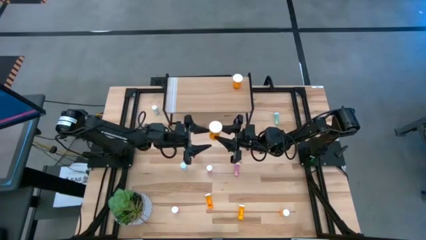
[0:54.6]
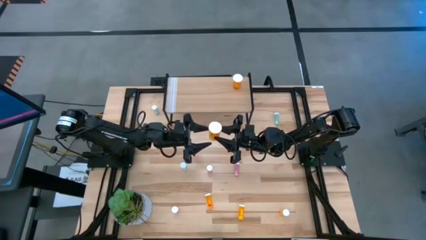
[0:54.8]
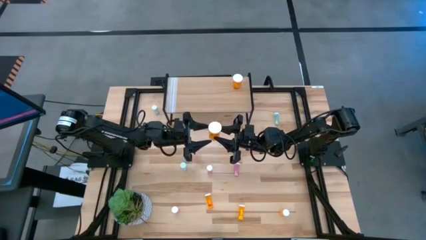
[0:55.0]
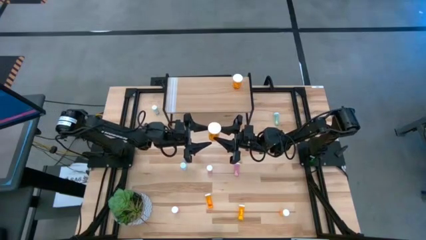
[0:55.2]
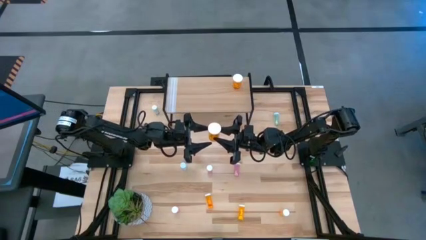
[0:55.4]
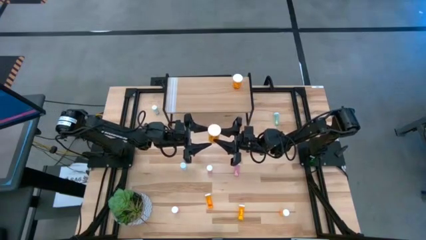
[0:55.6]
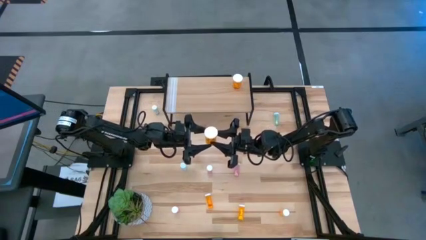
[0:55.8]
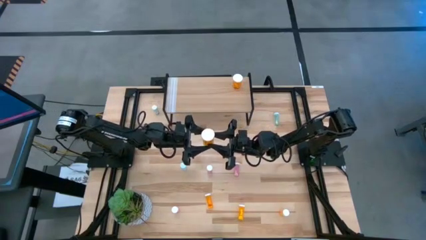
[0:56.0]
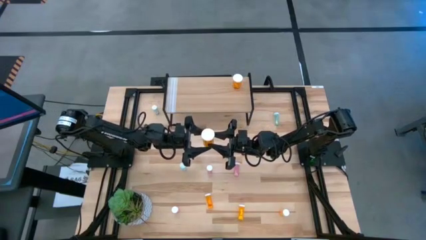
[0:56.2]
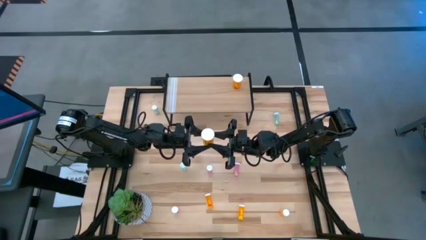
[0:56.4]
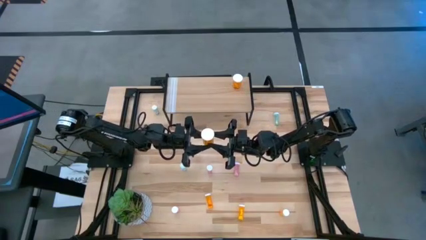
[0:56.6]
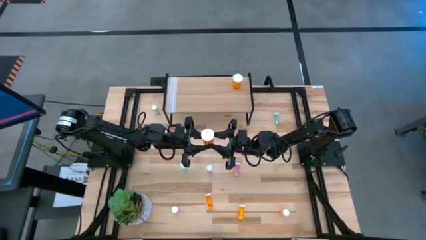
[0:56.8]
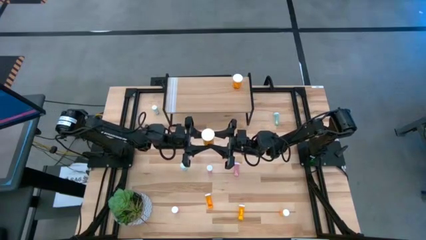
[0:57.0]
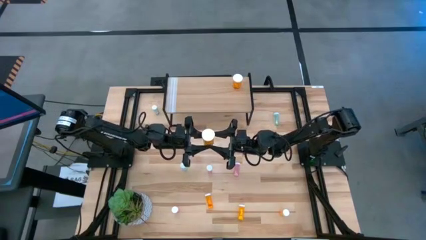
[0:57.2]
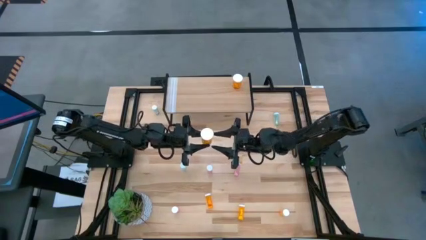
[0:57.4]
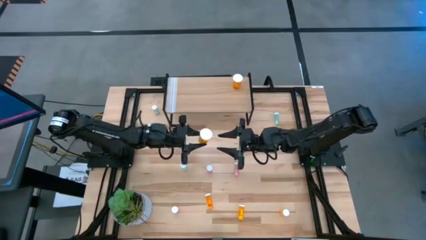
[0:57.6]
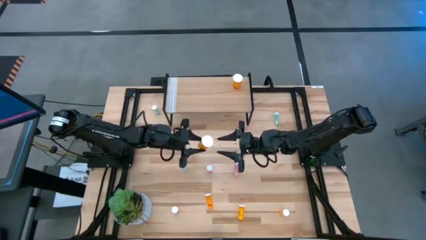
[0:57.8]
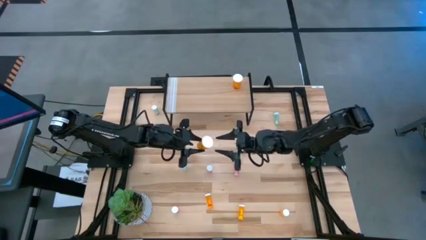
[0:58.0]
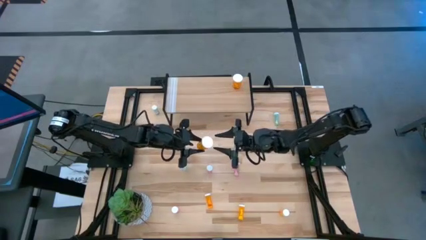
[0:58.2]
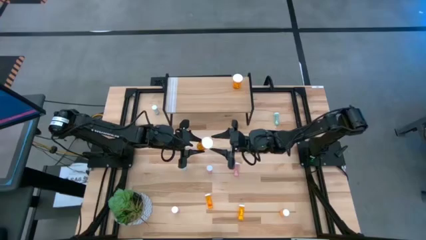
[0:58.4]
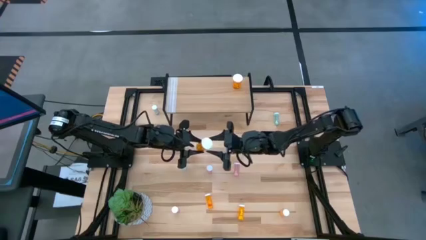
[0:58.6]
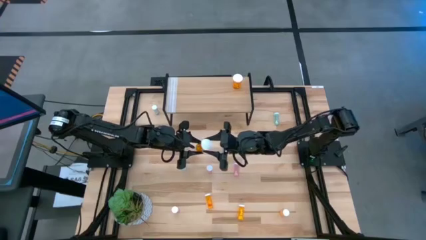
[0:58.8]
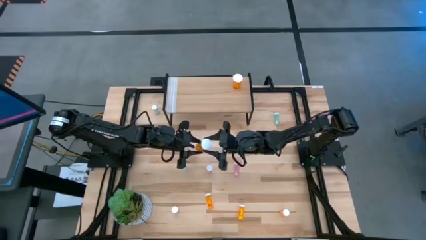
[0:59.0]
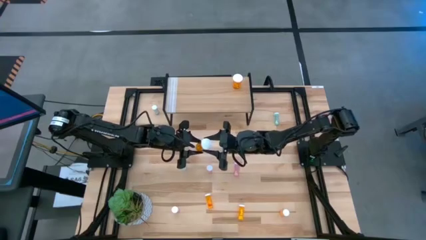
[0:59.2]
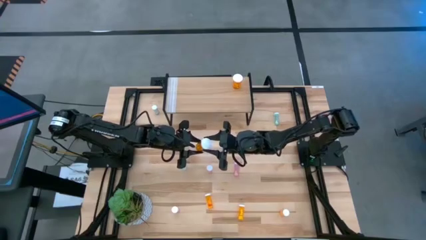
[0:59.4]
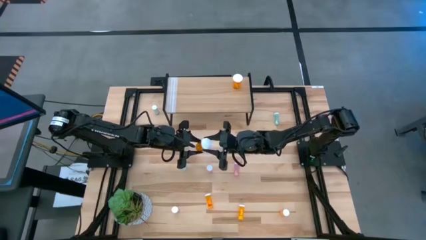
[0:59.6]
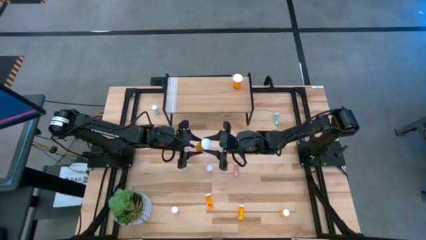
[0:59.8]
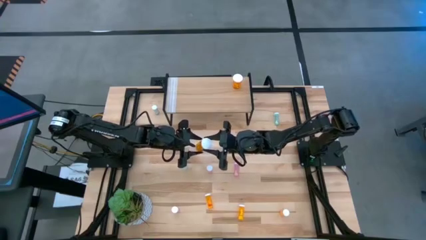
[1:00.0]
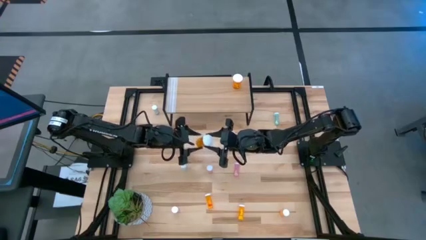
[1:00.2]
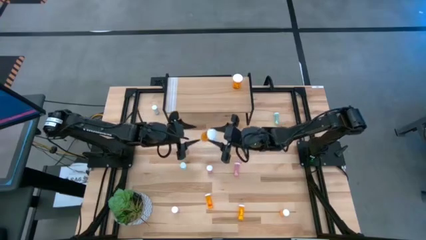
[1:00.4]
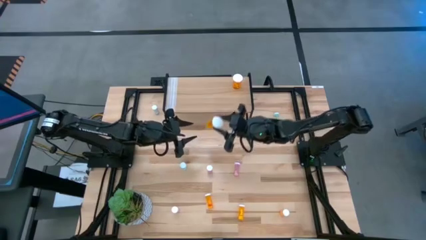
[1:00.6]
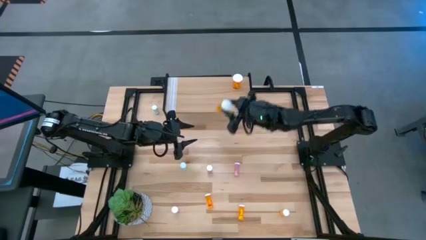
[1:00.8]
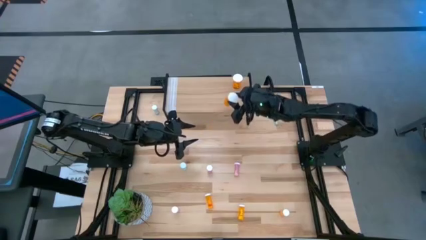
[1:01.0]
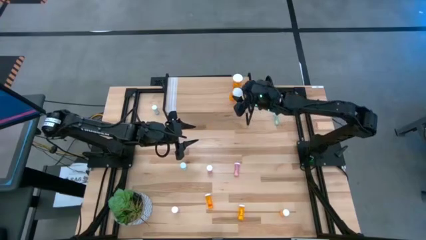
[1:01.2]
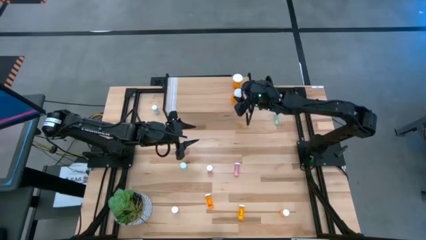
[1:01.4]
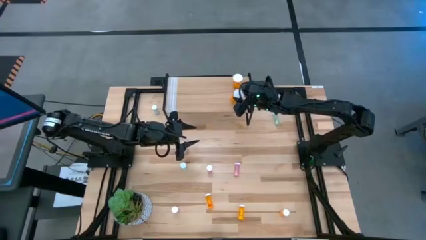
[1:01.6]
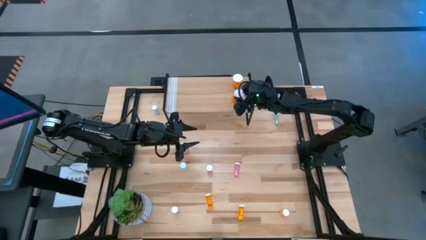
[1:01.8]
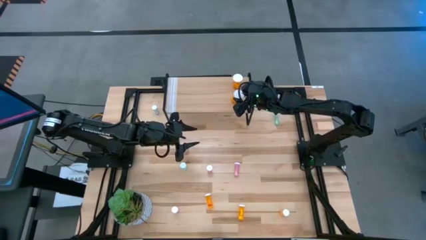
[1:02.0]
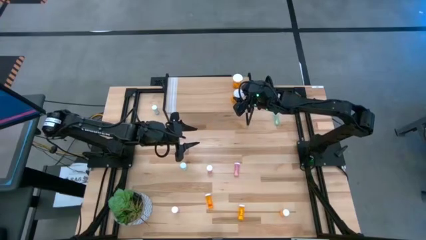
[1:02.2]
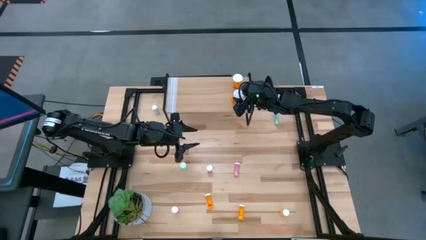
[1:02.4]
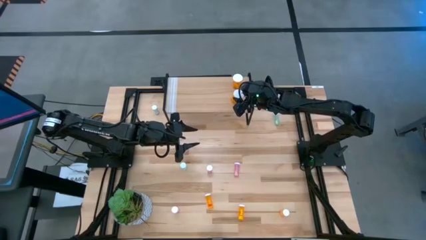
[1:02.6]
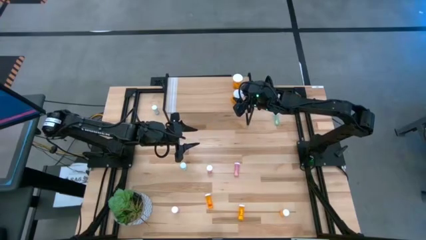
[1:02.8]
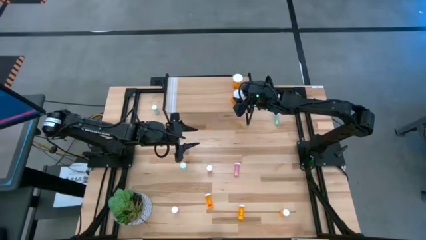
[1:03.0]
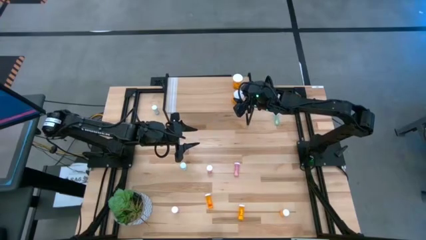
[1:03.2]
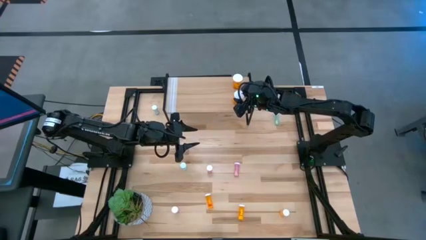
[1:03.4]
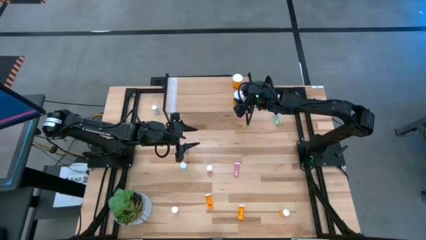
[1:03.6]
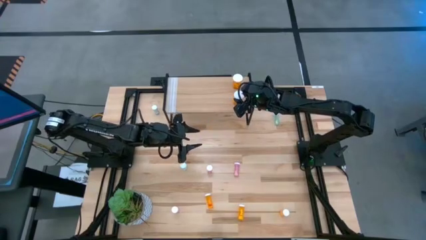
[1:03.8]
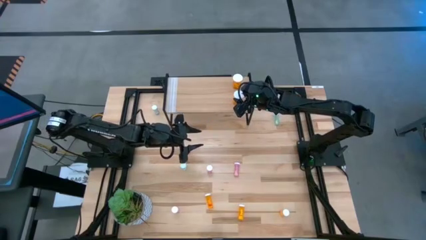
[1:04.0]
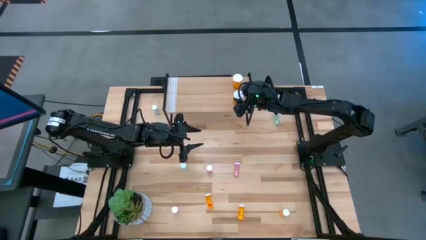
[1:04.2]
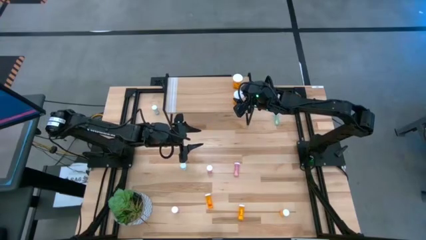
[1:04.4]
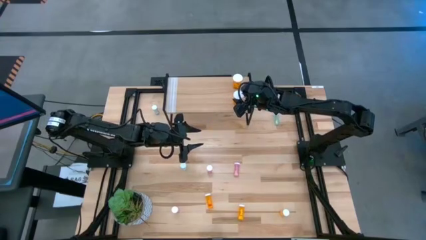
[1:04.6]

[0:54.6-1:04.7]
Task: Pick and place medicine bottles onto shelf by color
Put the large orange pill bottle on the shelf aligned with the other large orange pill bottle

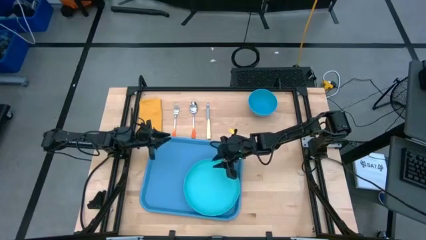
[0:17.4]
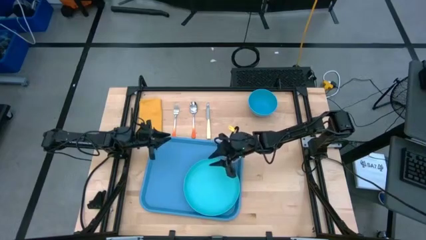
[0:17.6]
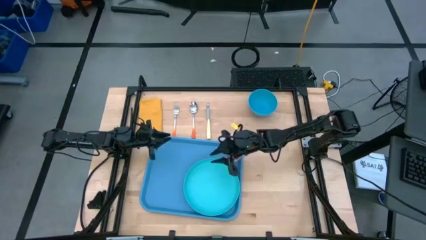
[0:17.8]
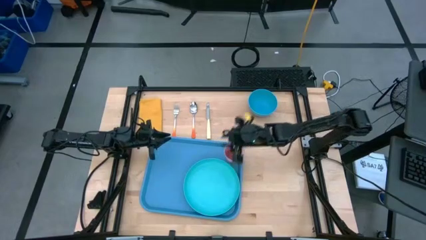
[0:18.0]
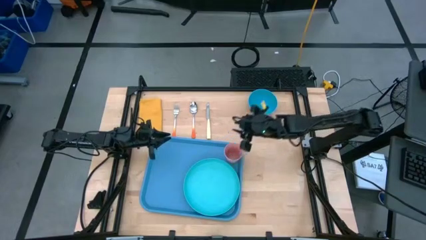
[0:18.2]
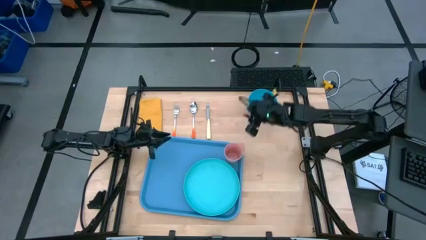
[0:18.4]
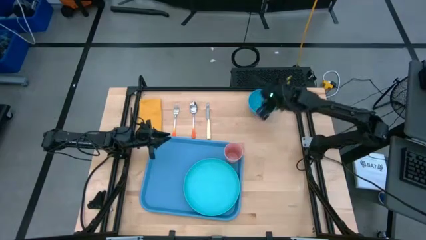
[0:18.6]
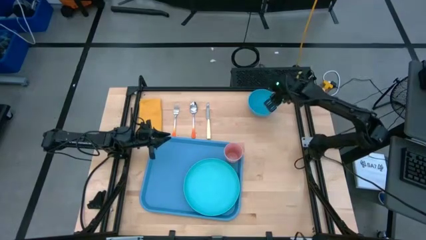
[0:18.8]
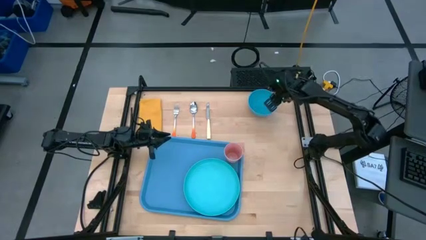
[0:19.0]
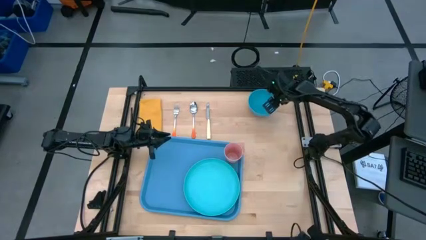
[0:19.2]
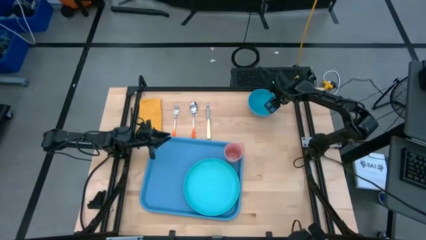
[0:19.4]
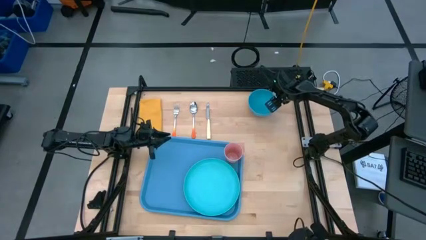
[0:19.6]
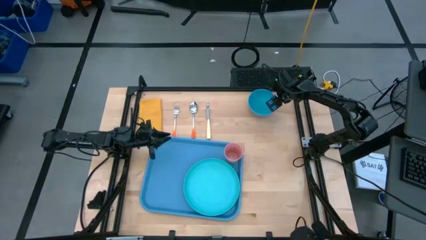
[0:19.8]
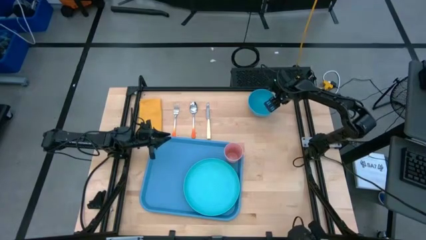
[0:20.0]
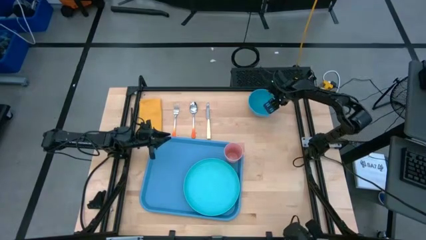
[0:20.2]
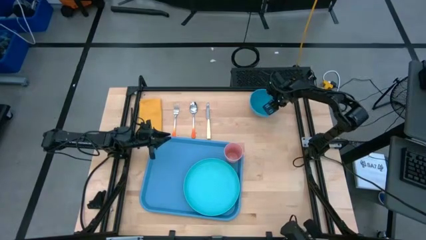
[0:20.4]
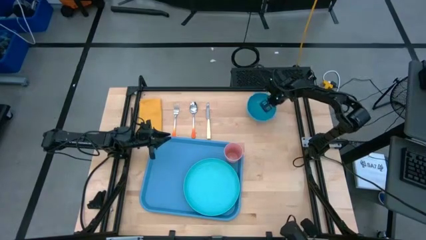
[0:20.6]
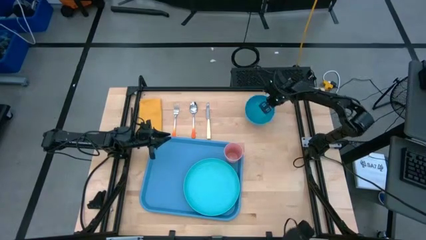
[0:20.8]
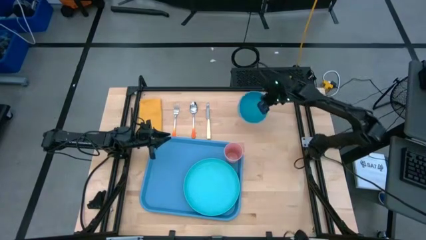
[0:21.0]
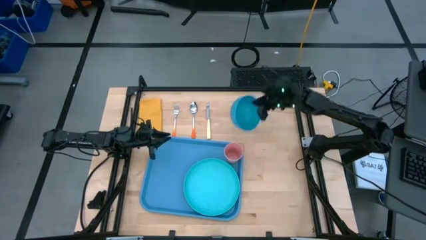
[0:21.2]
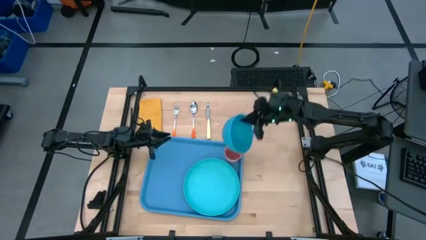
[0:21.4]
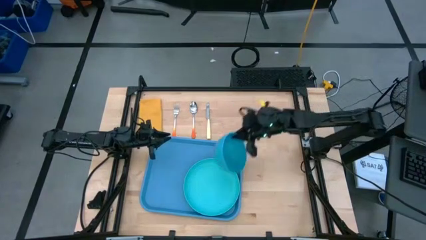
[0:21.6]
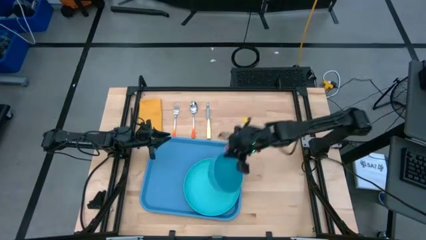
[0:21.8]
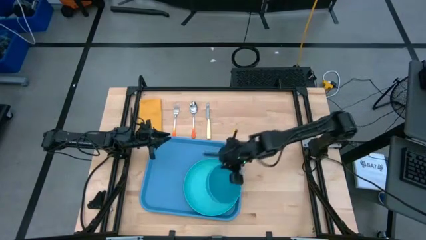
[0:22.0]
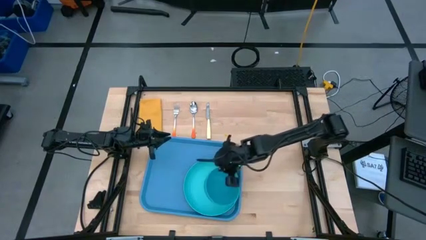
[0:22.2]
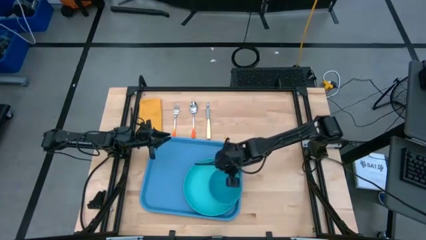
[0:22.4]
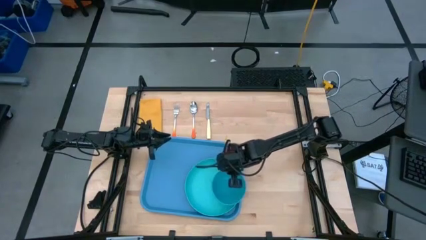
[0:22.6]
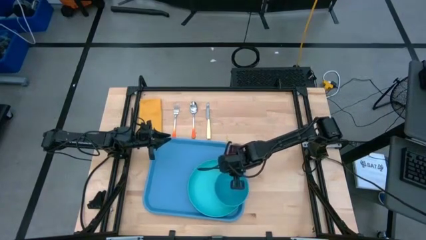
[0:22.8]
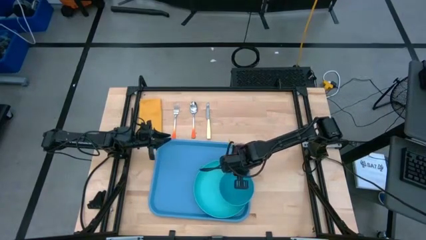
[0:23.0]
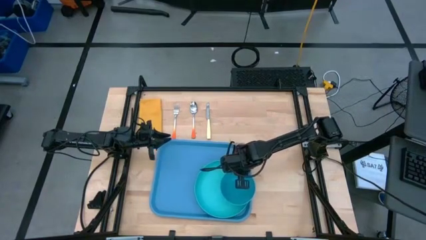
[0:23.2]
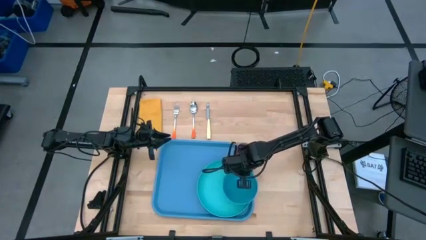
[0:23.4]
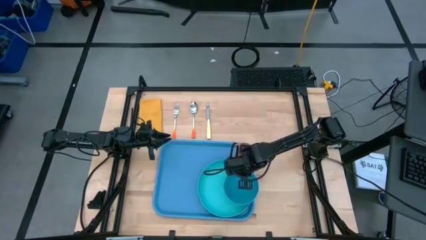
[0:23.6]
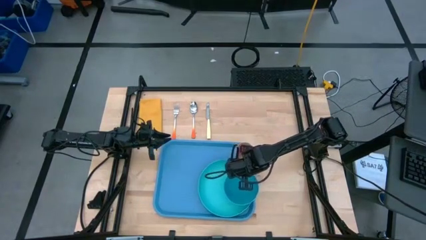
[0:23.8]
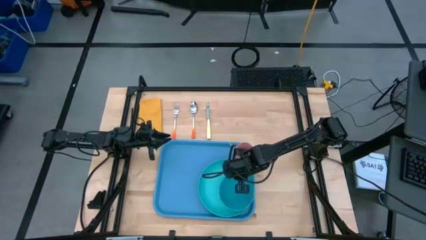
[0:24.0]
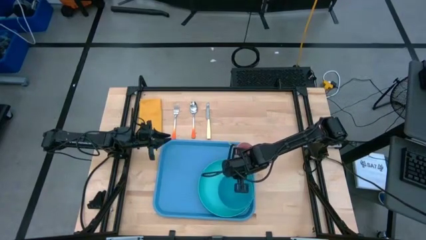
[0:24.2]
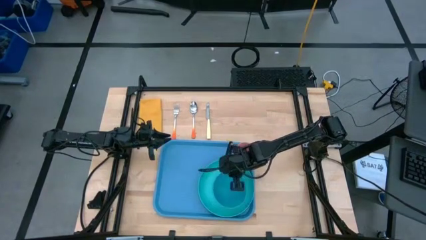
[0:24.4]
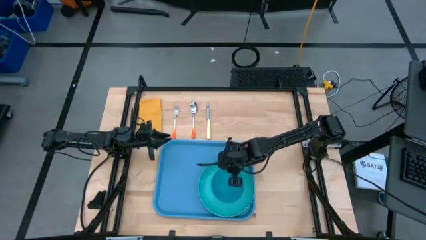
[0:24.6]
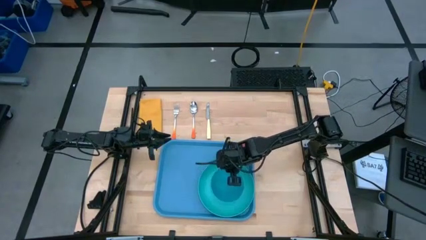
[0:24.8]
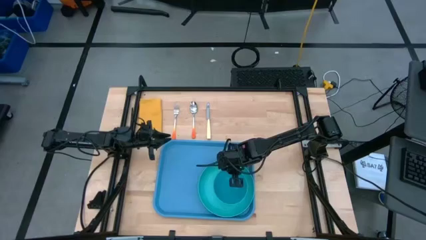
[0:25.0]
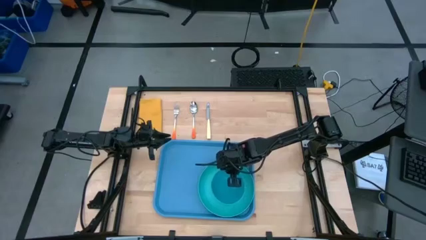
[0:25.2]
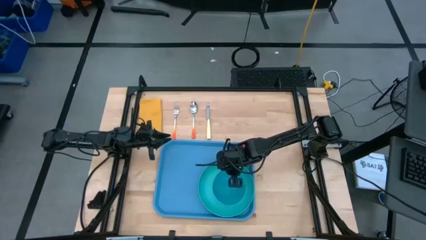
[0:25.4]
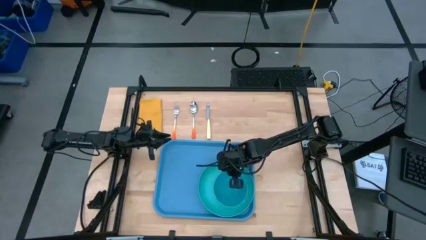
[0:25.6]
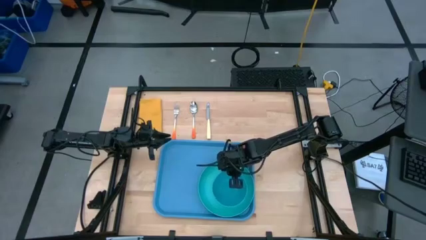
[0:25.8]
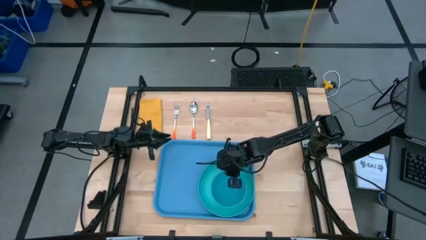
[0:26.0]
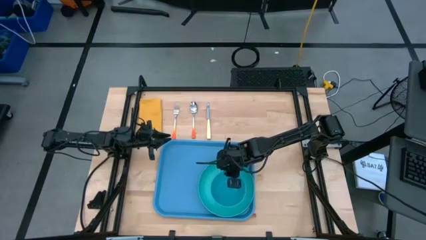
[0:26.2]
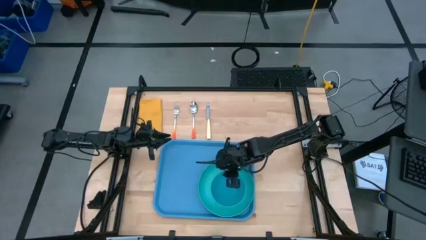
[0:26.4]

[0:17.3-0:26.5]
Task: Set up tray
Put the blue bowl on the green plate
